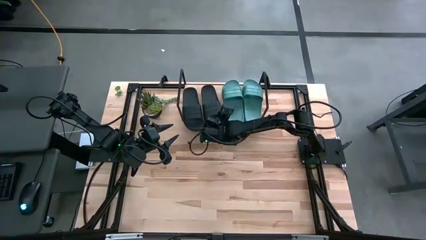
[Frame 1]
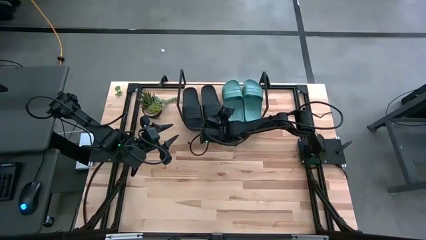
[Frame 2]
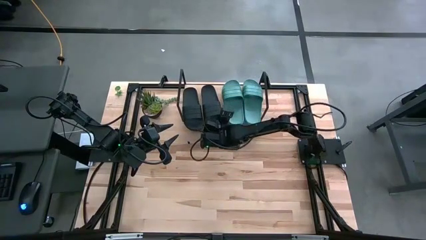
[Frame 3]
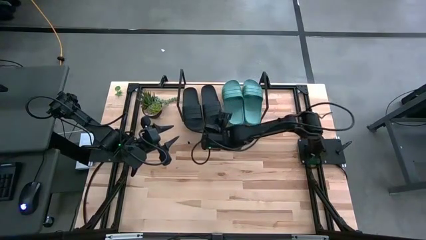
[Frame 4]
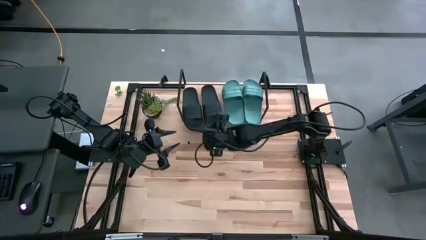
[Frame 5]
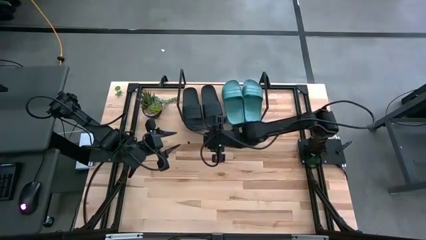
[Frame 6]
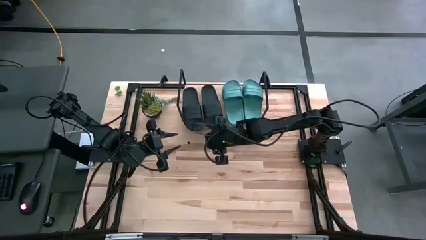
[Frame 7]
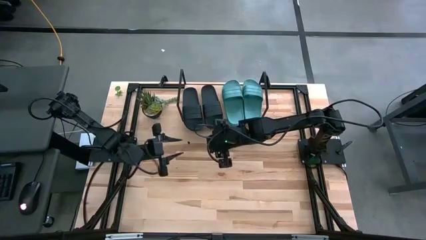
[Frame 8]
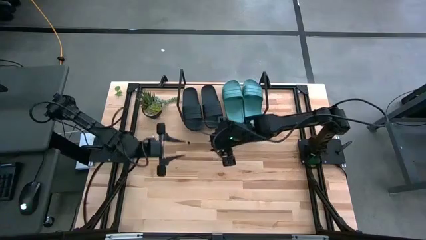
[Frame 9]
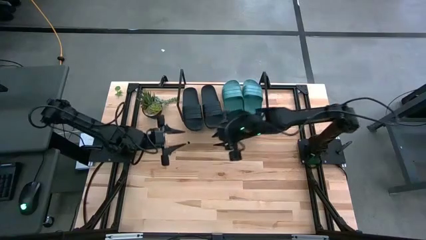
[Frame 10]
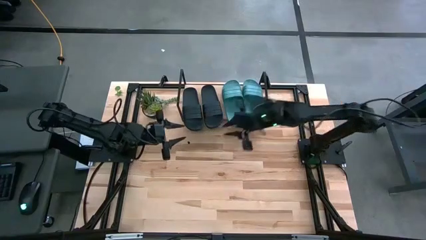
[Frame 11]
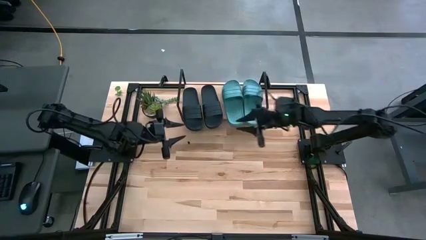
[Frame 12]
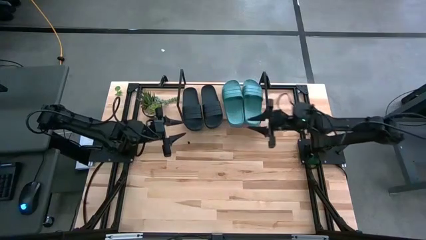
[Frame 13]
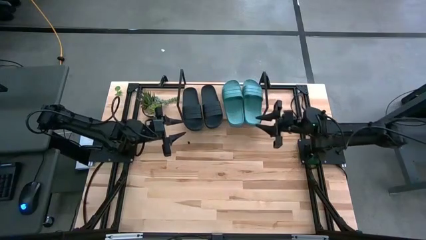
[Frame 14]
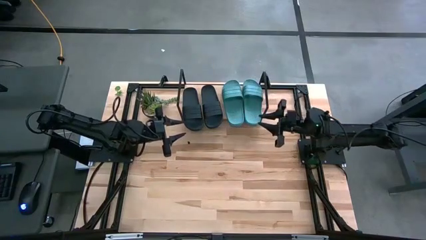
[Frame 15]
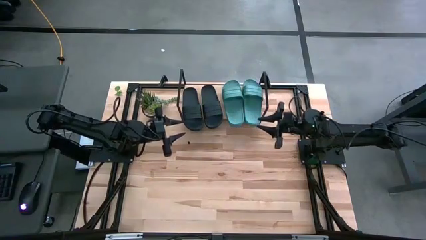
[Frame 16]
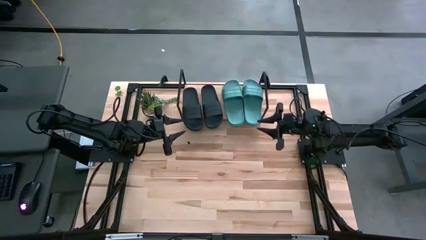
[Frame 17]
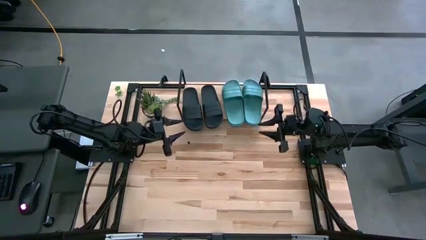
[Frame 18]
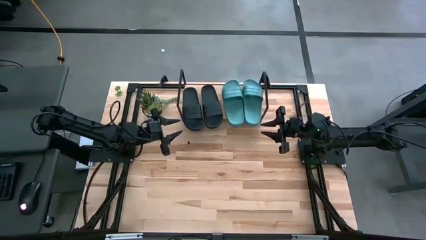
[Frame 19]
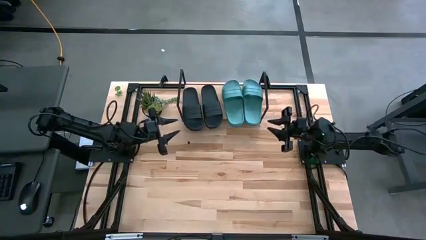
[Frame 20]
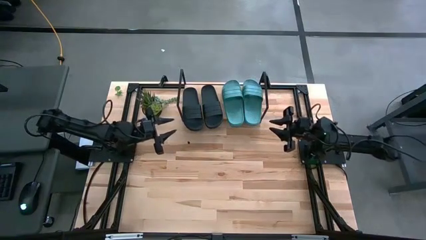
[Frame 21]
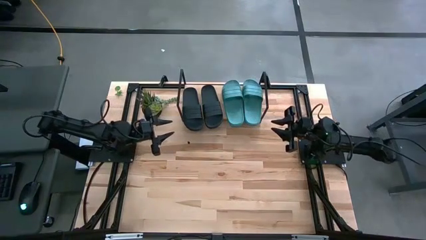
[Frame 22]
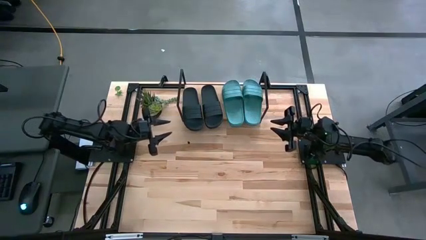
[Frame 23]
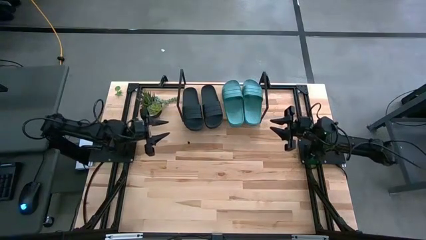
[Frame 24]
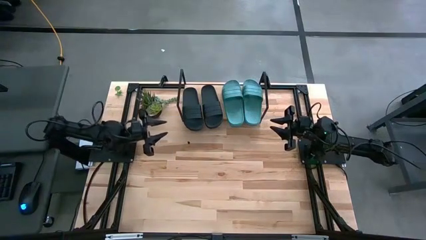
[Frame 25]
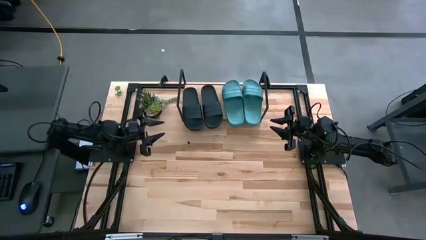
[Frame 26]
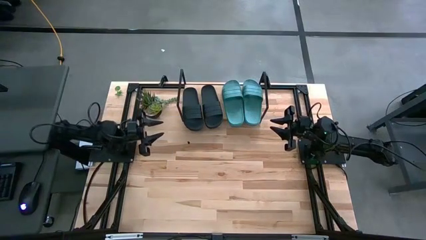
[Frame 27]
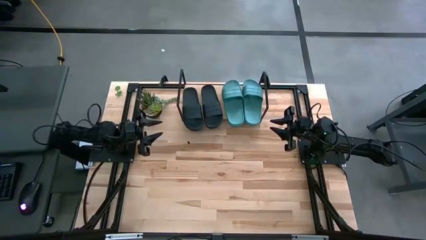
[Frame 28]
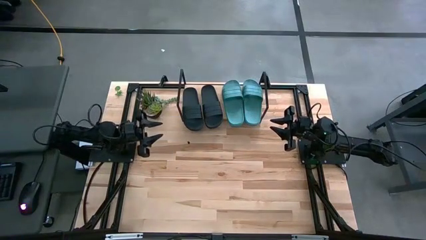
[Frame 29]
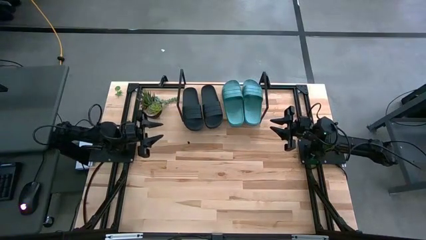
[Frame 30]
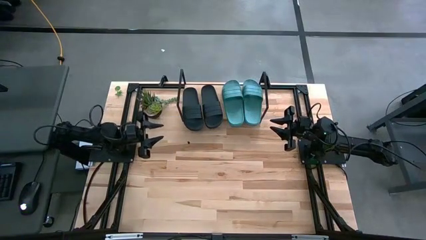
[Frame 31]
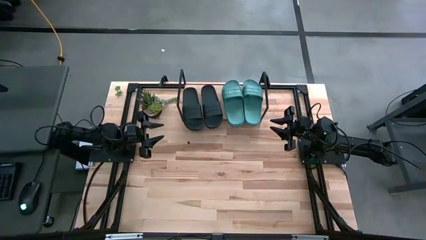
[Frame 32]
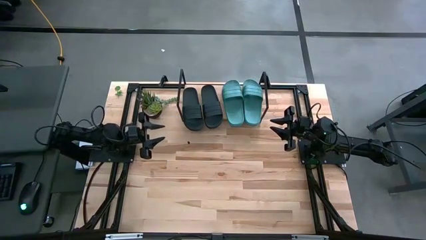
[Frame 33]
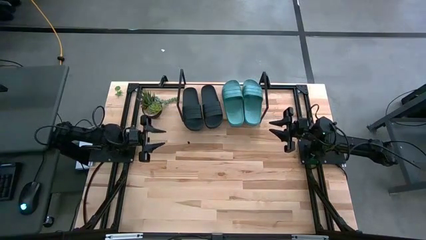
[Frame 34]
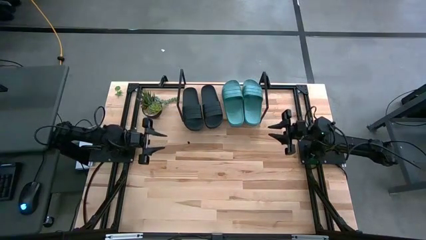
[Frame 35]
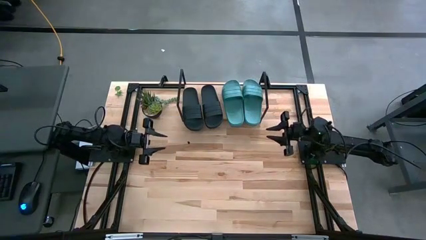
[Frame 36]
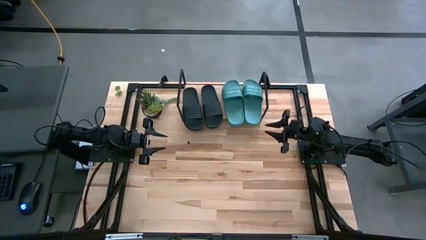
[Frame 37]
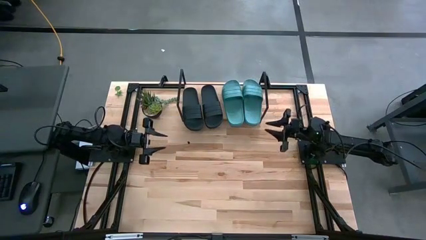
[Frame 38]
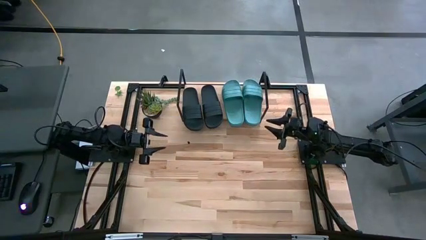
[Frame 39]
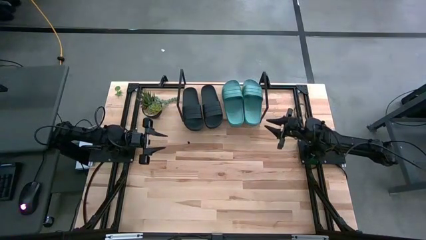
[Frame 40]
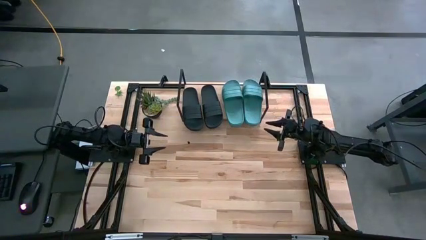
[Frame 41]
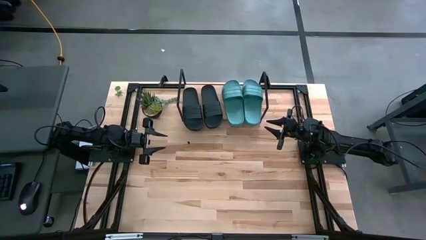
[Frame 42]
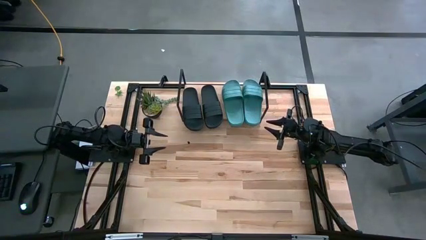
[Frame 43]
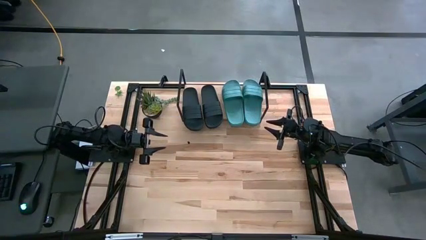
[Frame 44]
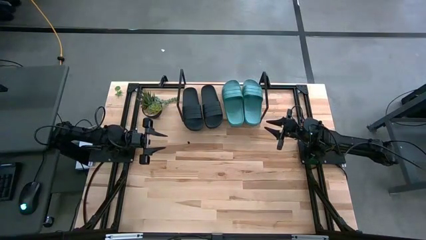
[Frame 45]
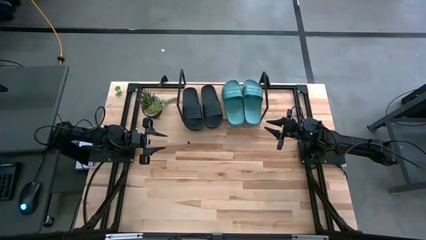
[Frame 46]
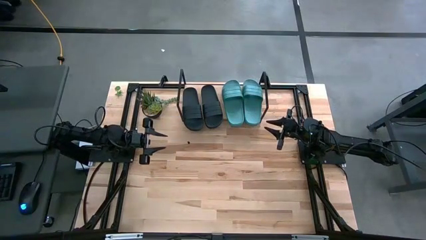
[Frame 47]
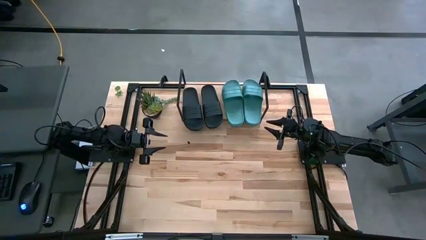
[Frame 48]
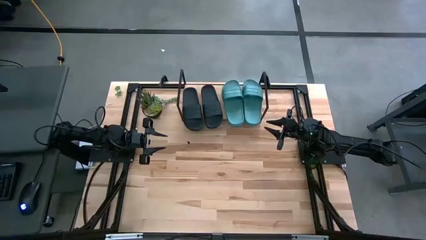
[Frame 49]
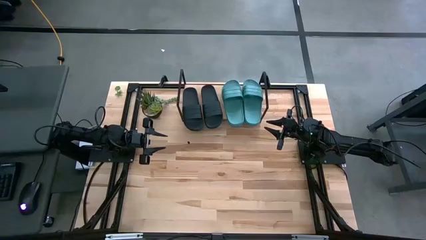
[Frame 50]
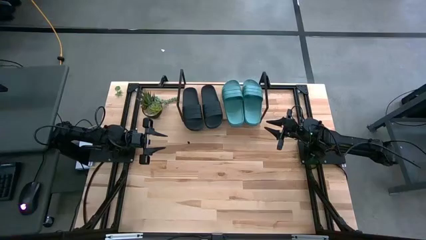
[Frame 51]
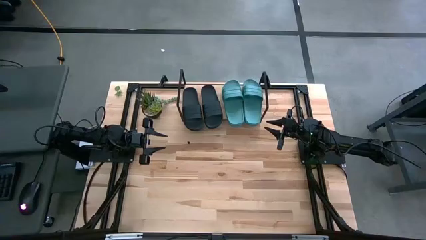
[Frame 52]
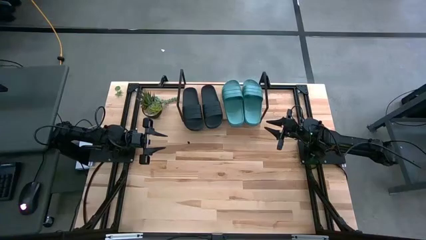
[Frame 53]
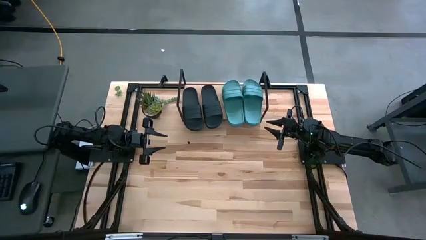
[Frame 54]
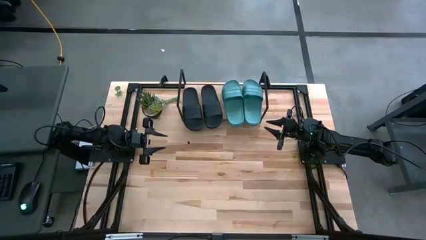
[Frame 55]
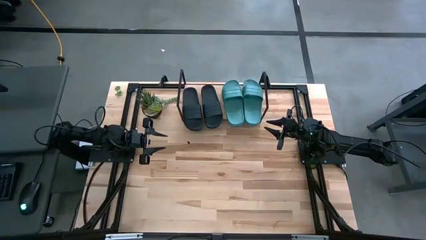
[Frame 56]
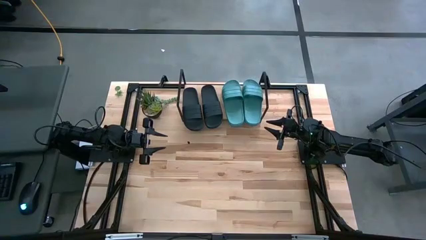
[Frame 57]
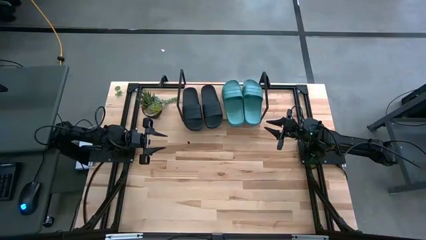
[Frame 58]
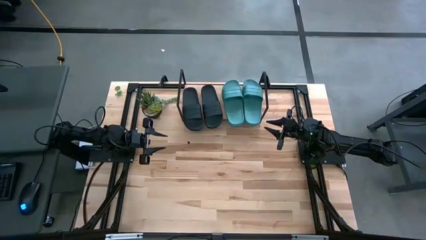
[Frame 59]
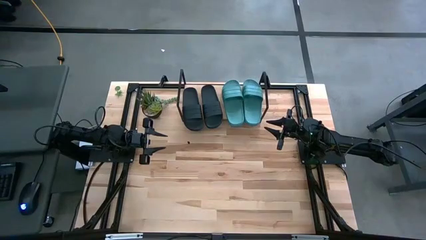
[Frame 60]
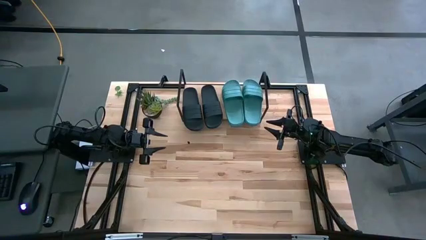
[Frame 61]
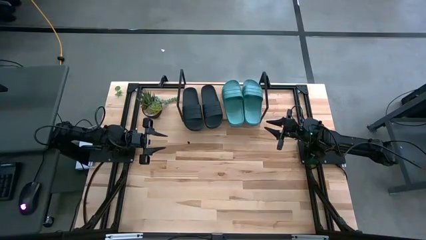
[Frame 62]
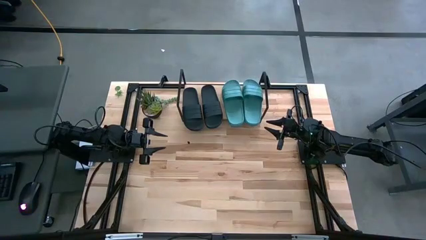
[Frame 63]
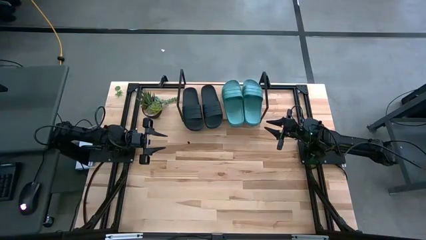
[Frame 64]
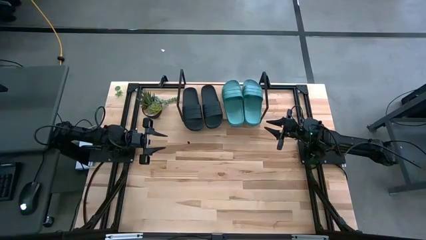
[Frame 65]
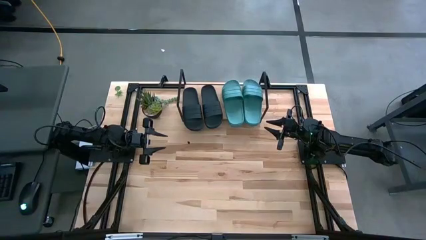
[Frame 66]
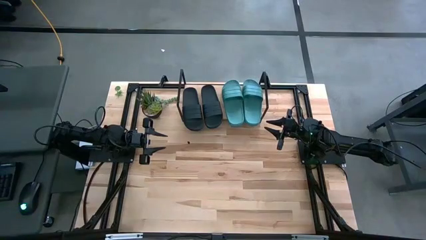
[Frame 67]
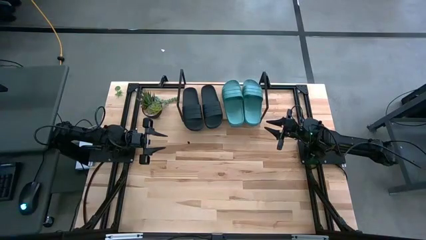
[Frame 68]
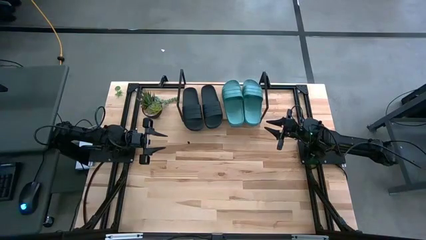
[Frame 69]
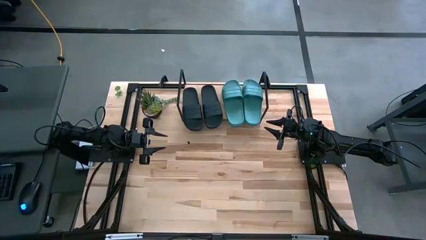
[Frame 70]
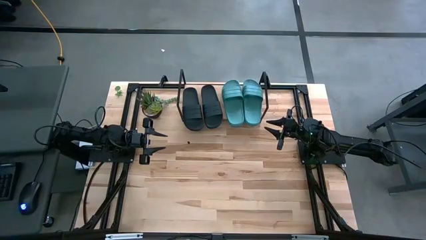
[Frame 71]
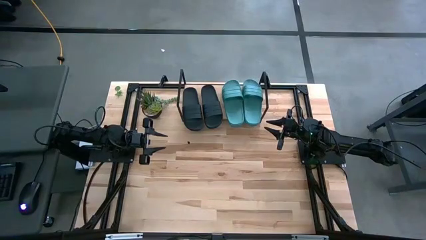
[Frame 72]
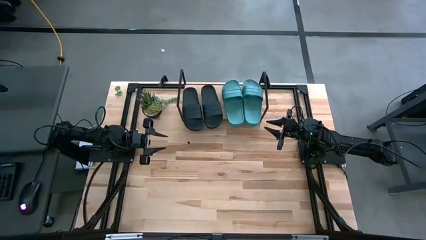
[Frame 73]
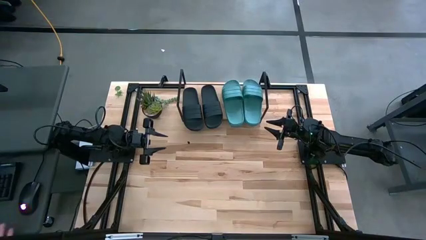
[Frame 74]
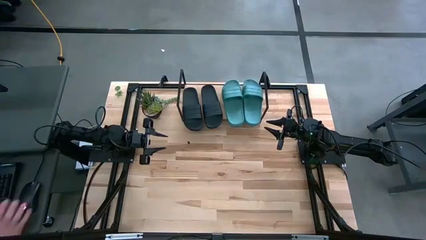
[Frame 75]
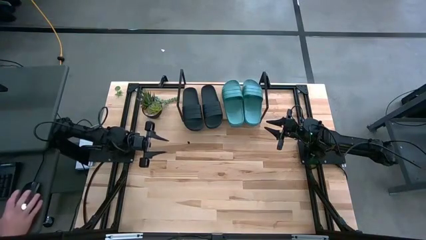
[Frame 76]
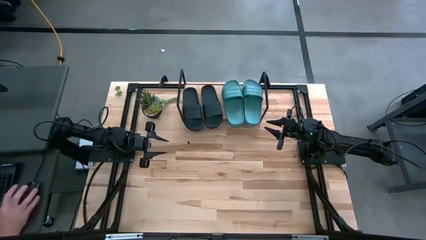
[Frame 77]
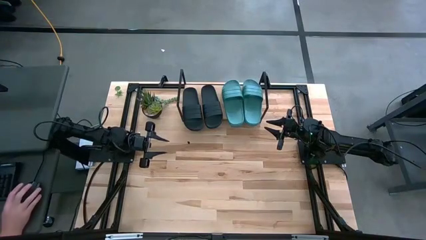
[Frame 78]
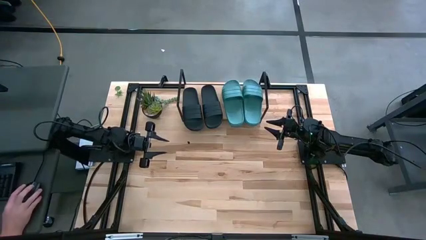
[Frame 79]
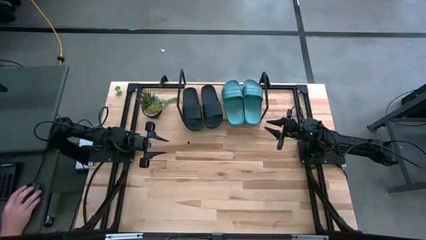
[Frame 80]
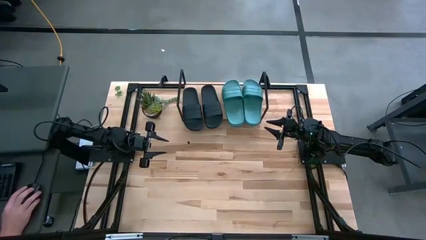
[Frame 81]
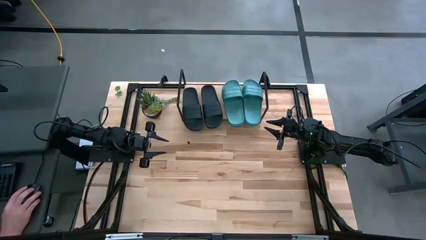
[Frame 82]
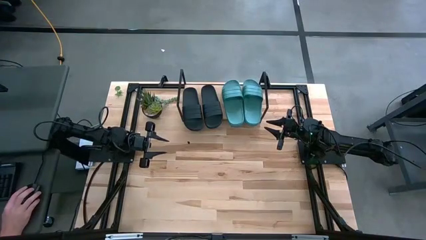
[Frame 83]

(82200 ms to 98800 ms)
Task: Pick and place slides into the shelf
Return to Home Position

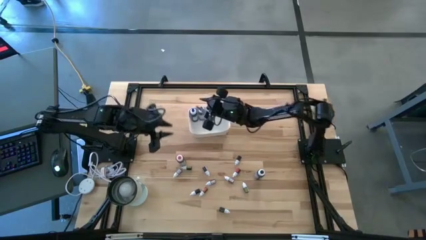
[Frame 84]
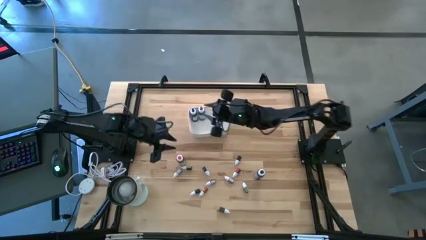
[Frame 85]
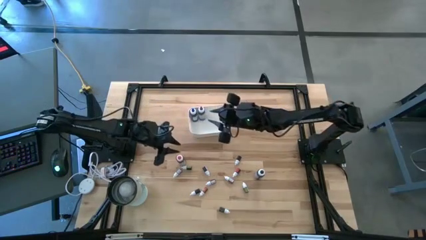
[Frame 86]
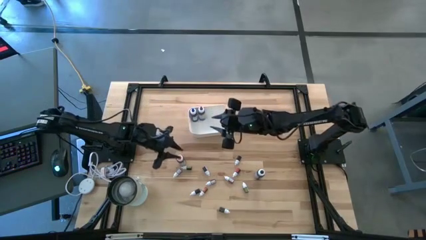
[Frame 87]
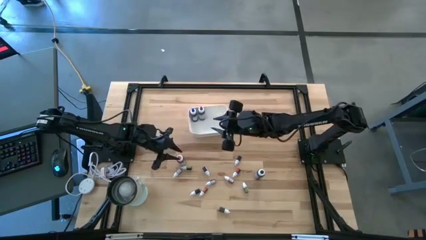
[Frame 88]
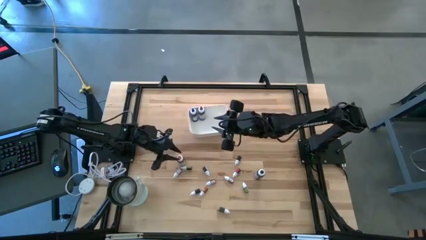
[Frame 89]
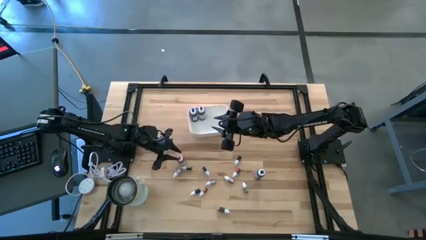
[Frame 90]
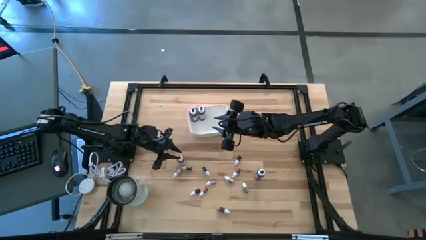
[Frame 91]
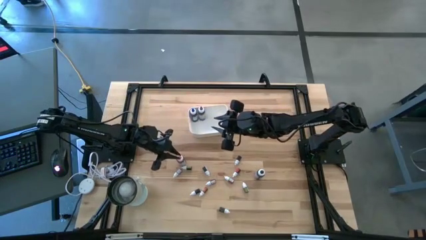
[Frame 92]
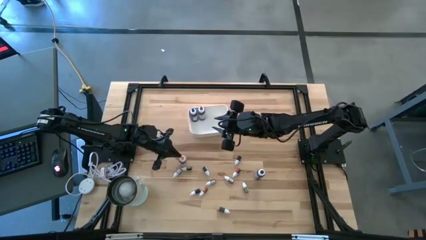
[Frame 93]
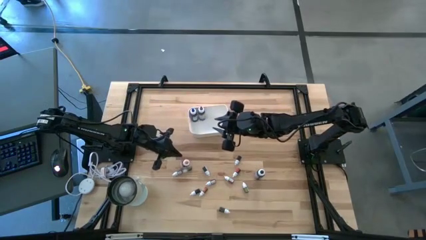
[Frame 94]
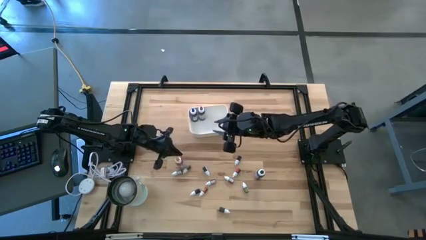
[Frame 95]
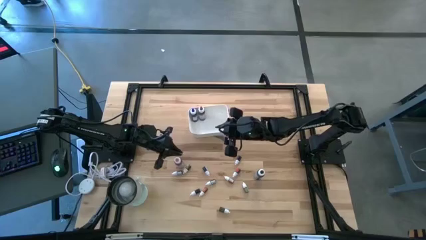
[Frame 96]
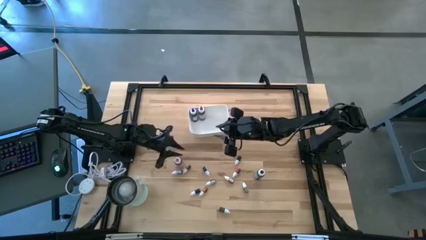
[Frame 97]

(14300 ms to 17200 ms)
Task: Pick & Place food coloring
Put the large pink food coloring bottle into the white bin
